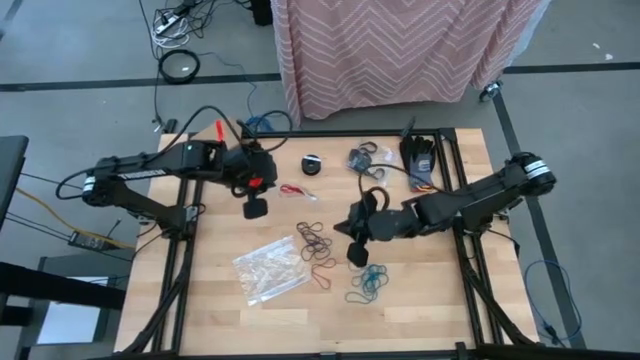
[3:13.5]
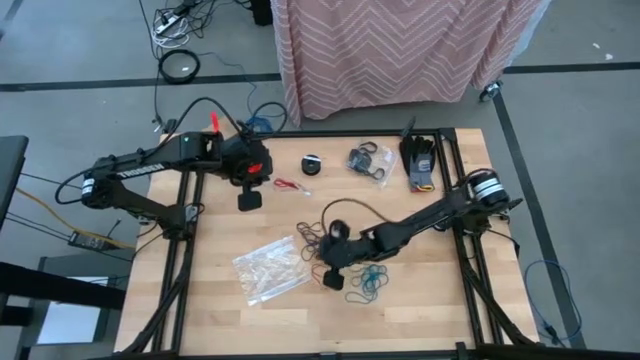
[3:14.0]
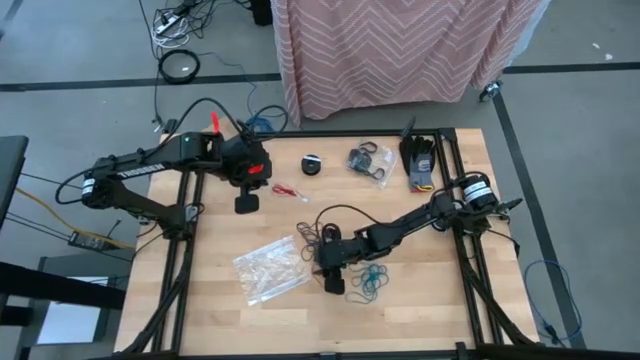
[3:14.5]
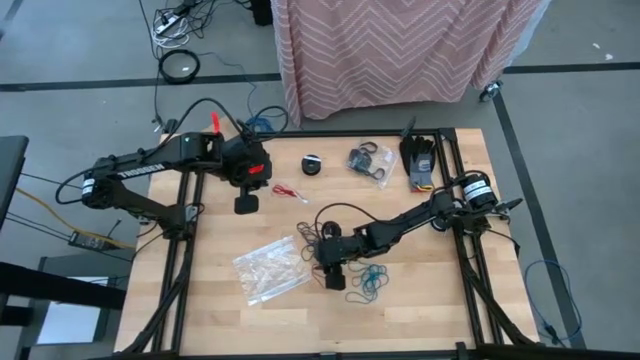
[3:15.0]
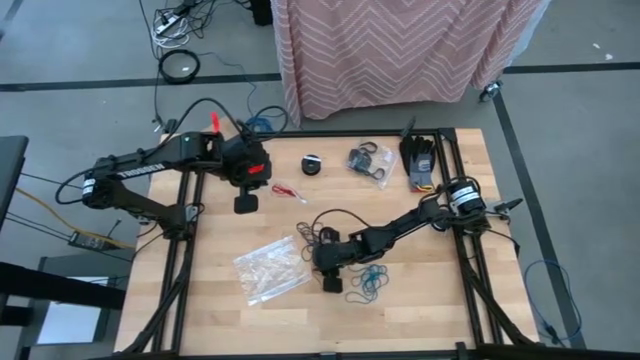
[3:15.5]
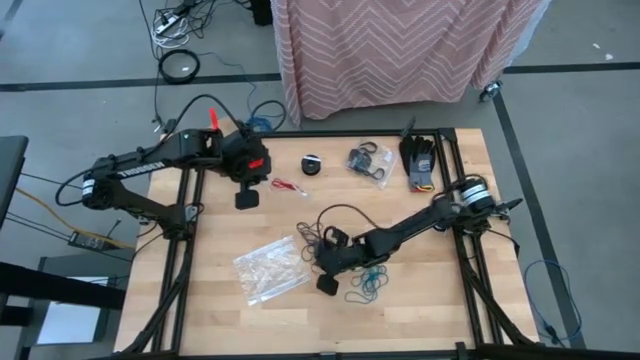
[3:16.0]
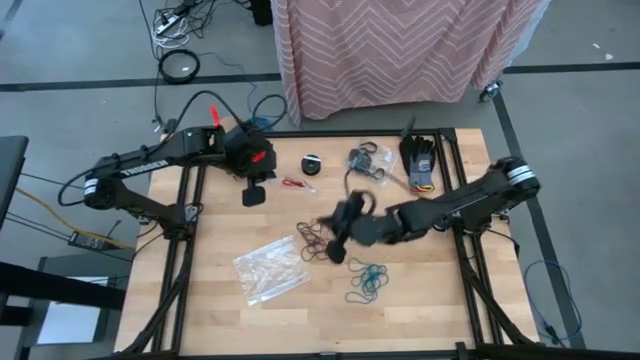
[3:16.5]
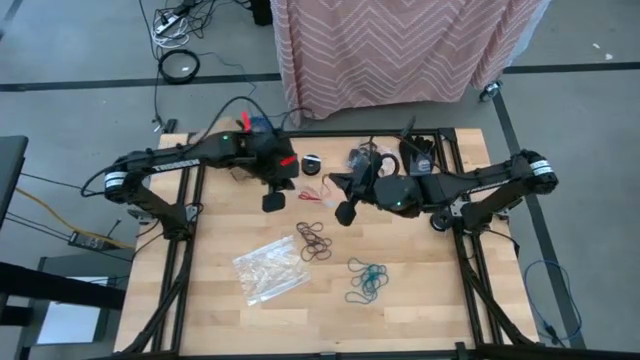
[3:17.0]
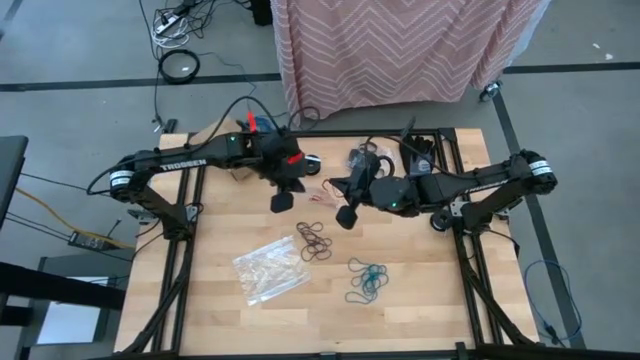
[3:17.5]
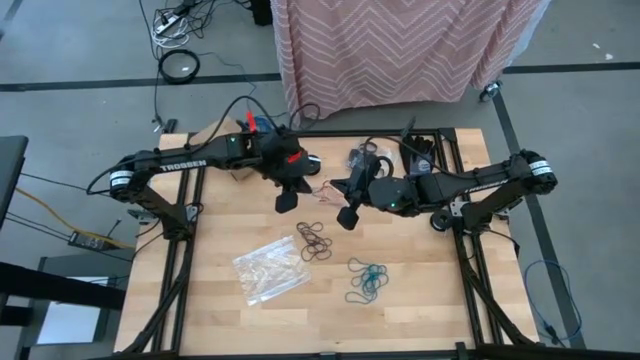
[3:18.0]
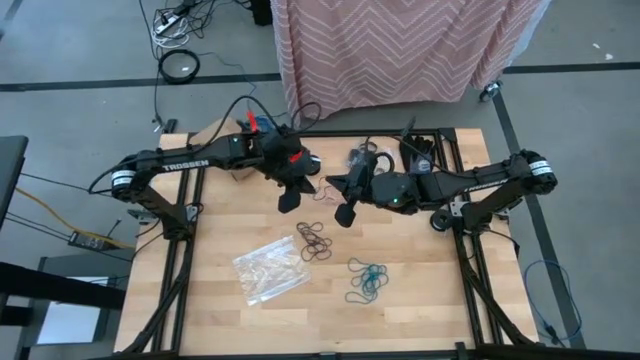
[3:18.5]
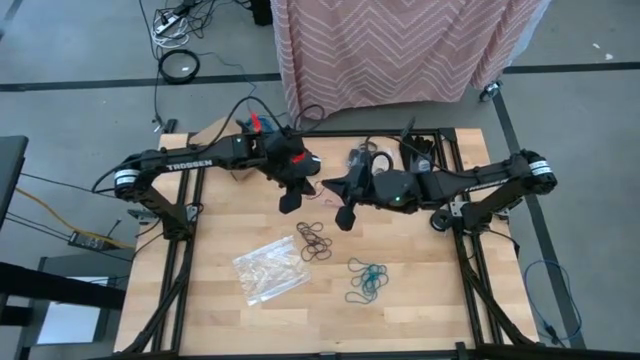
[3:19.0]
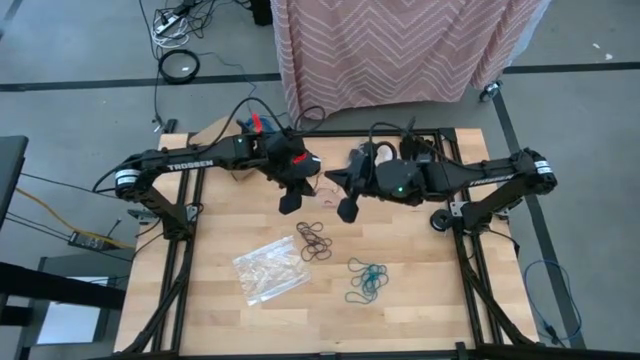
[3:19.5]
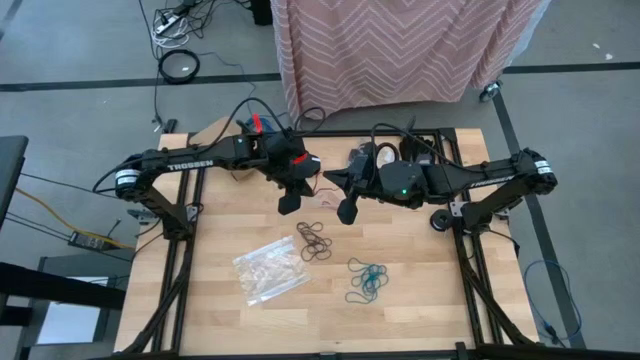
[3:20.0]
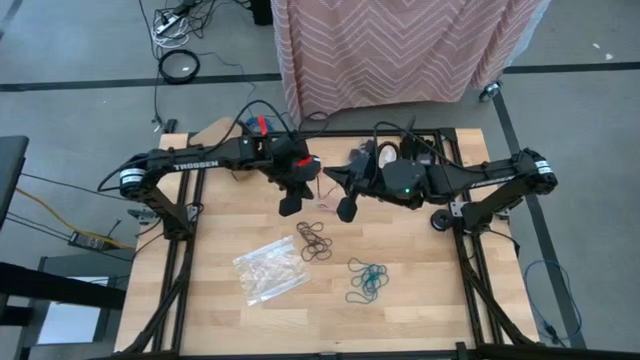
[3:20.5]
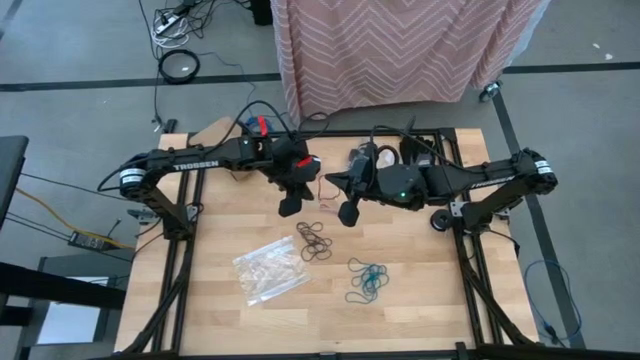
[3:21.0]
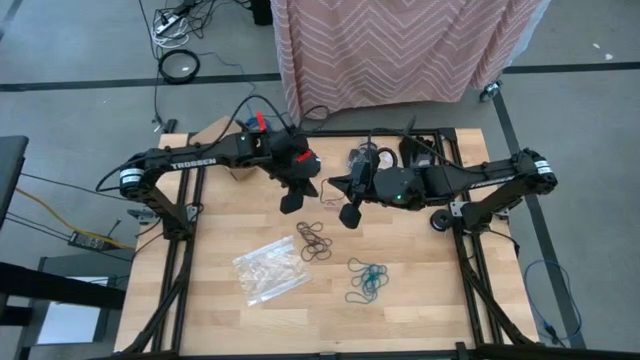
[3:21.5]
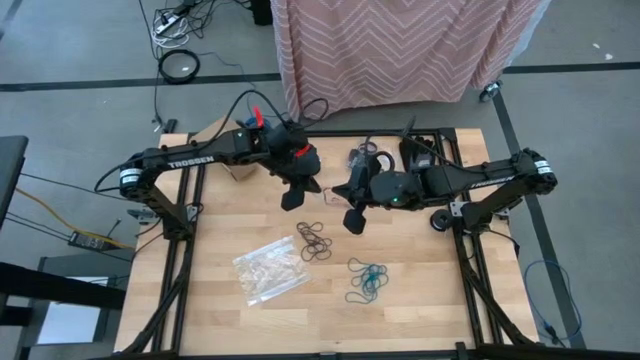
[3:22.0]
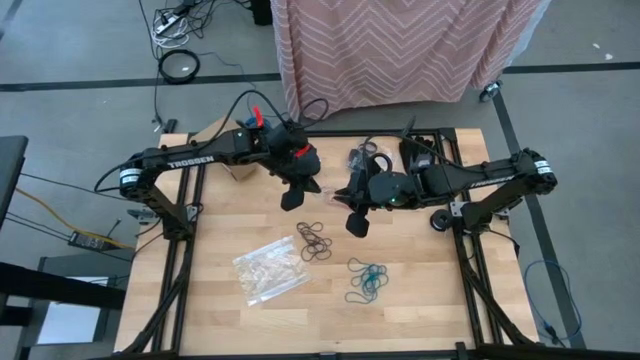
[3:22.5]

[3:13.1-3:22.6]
Task: Sort rubber bands
Put the red rubber band into the transparent zip bag

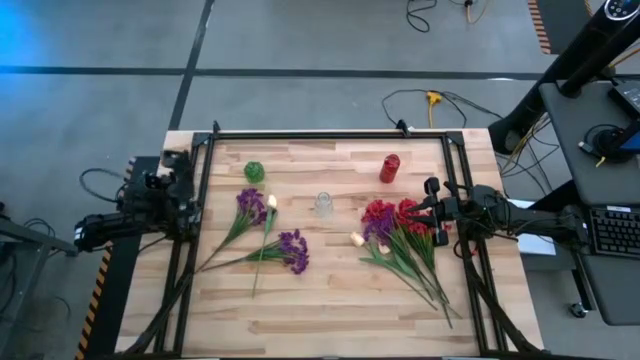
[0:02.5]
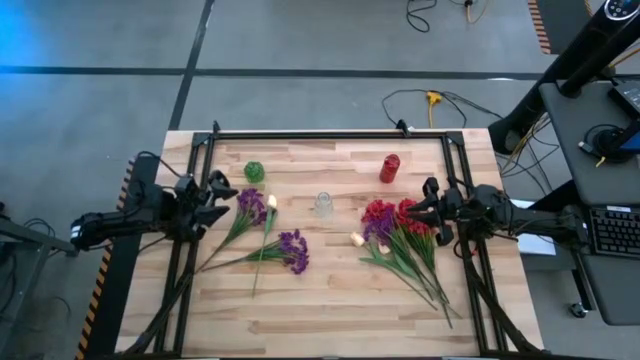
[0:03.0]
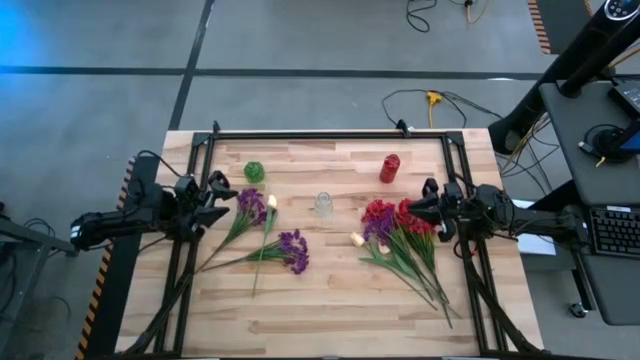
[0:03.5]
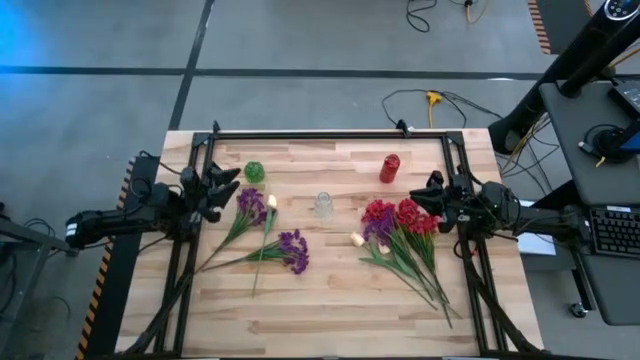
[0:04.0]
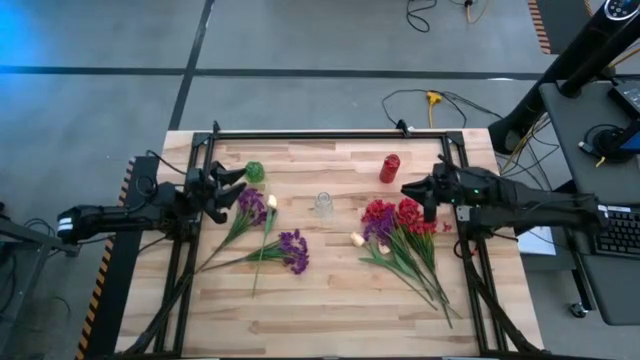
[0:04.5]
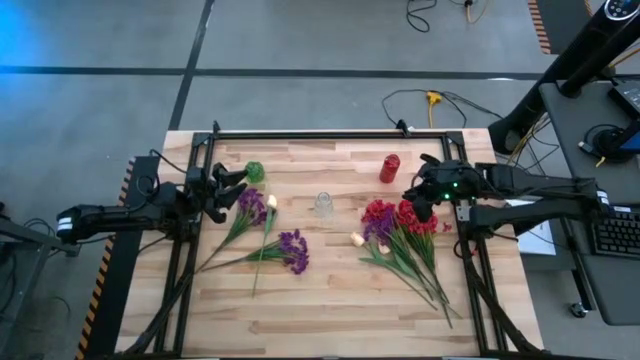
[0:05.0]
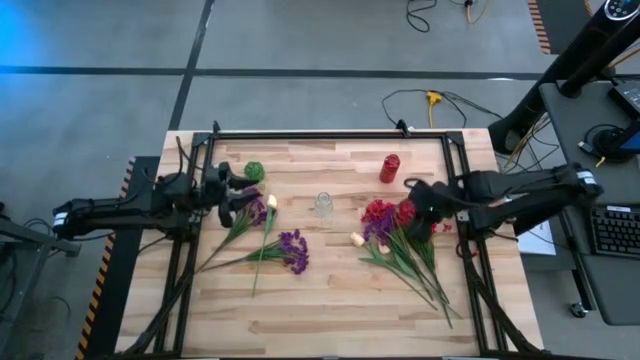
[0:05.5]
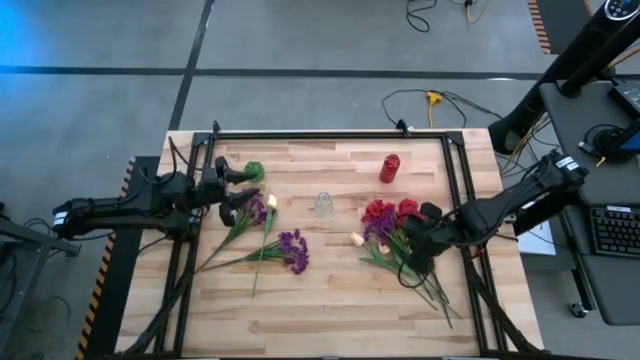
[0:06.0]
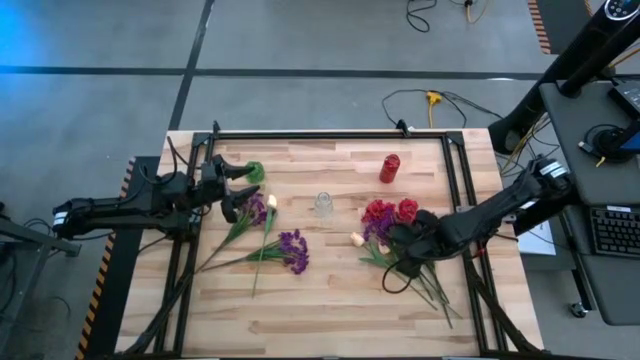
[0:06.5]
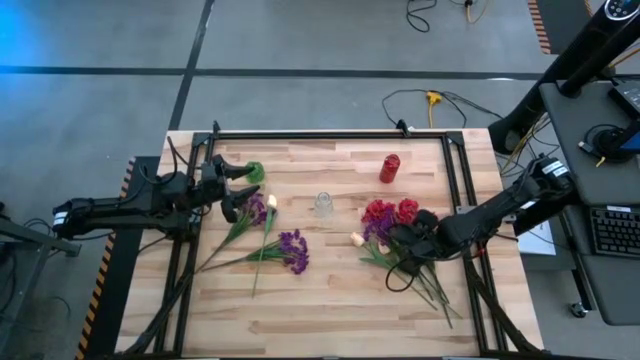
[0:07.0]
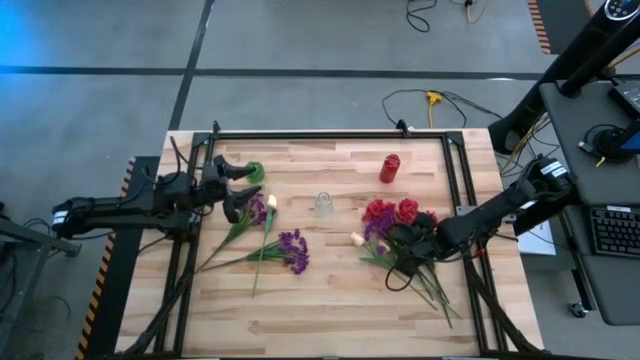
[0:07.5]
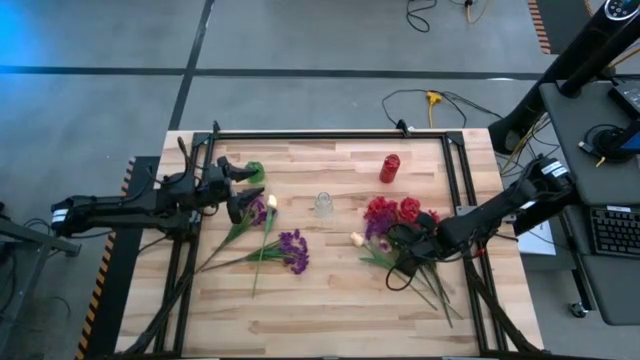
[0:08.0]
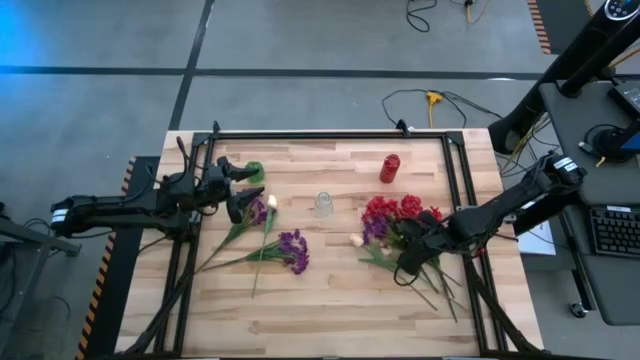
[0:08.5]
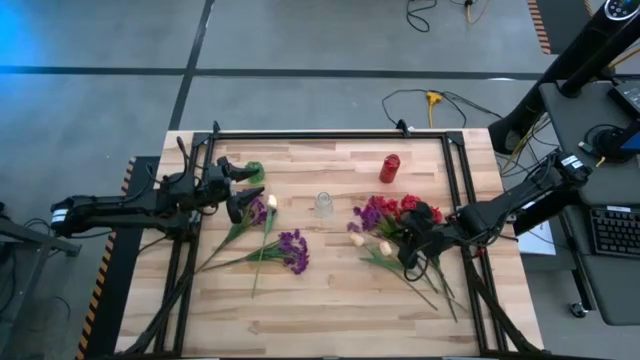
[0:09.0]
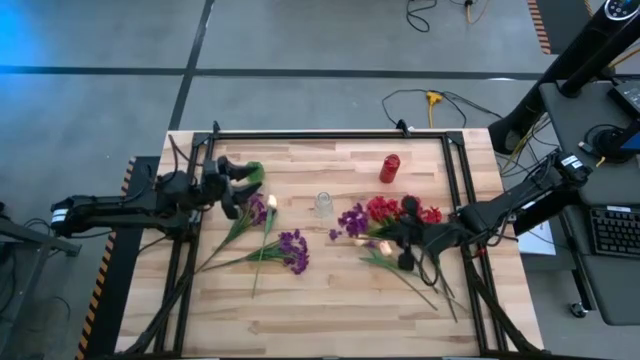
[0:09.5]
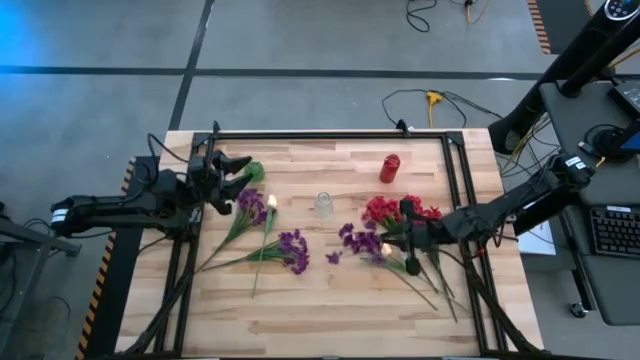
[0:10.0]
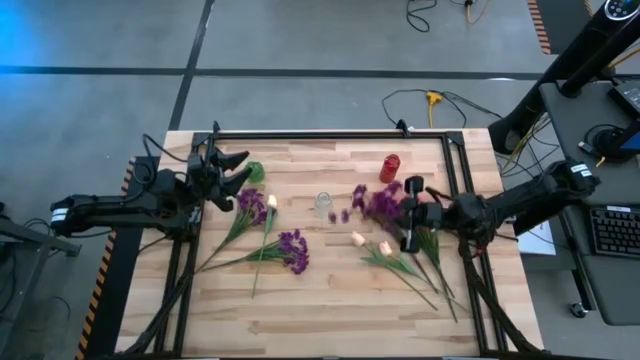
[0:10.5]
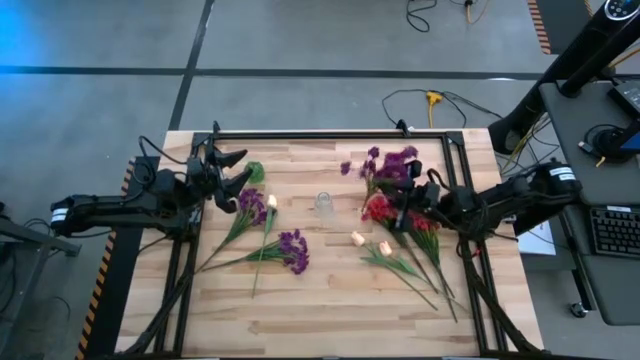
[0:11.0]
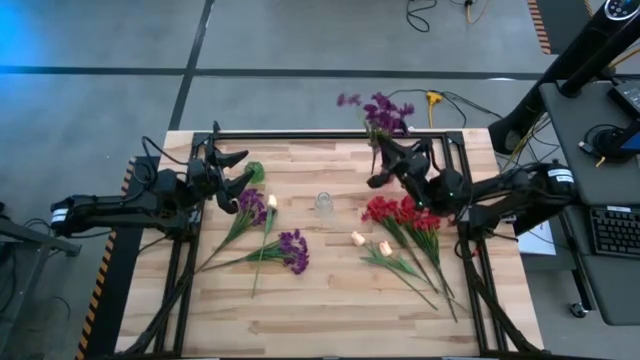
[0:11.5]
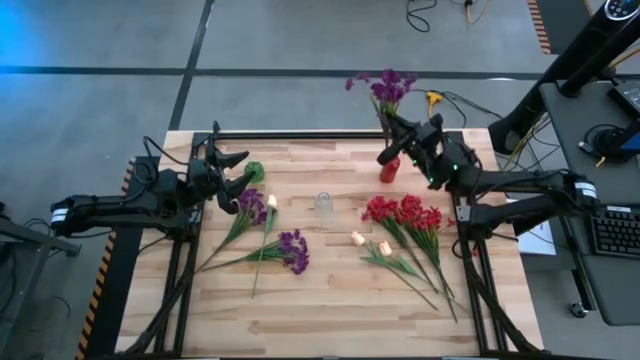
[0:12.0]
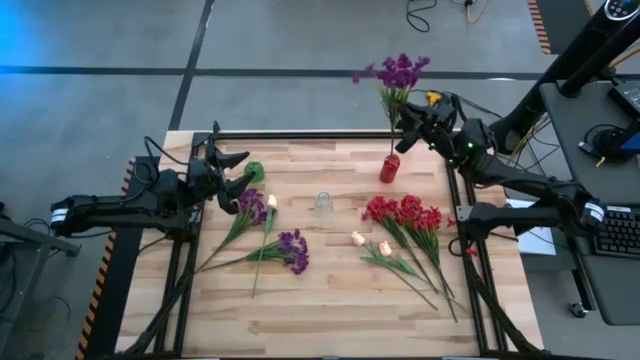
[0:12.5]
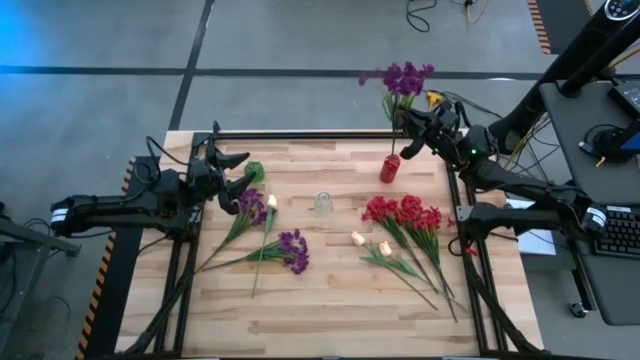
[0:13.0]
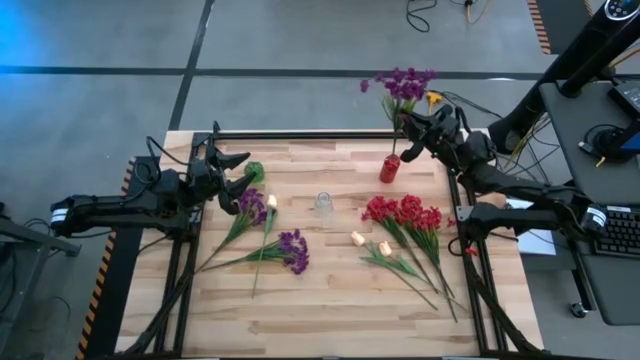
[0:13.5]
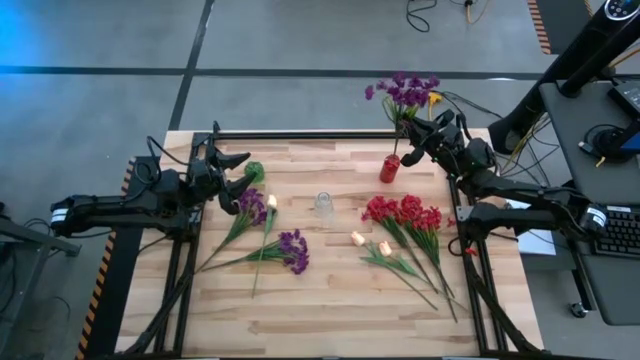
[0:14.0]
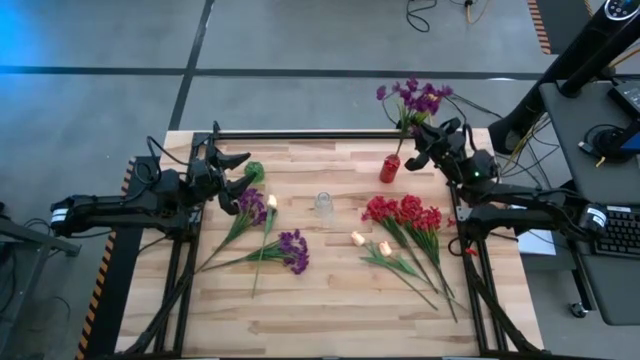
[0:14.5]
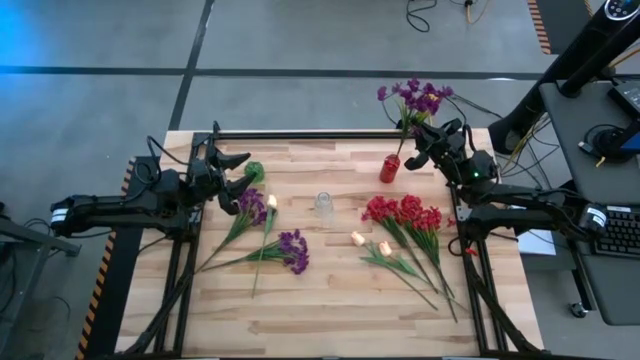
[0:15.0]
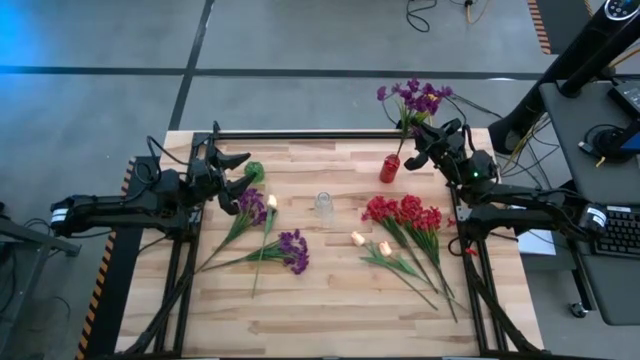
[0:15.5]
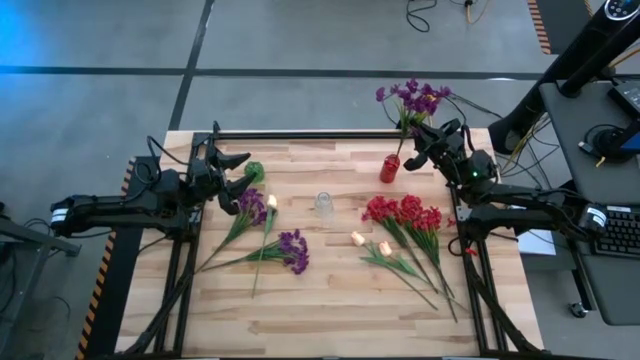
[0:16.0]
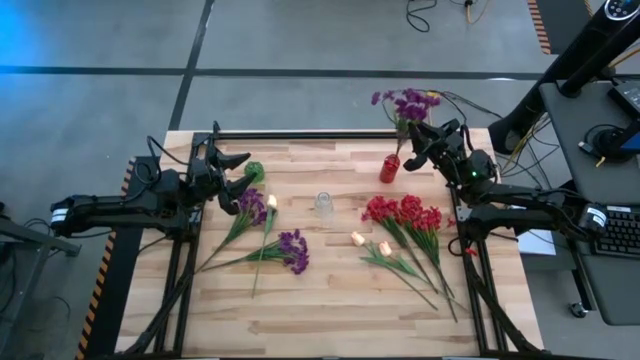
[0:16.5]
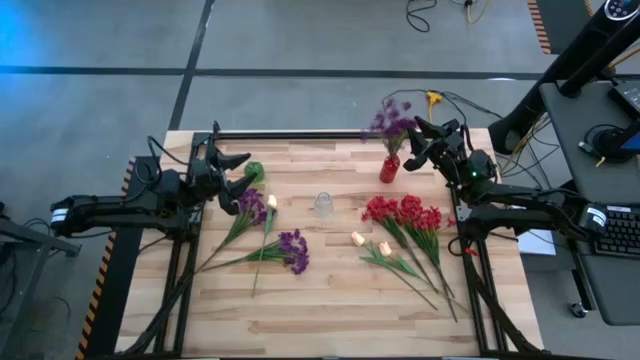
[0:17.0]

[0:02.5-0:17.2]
Task: Sort flowers into vase by color
Put the bottom right violet flowers into the red vase
